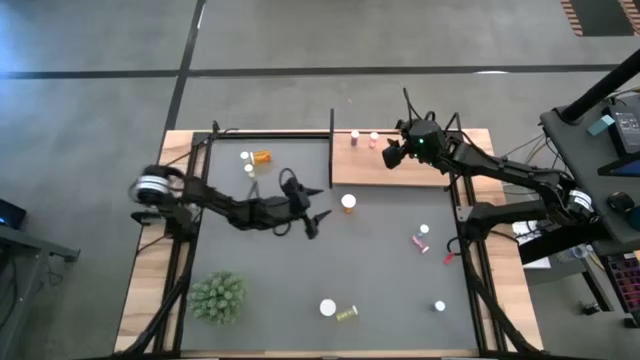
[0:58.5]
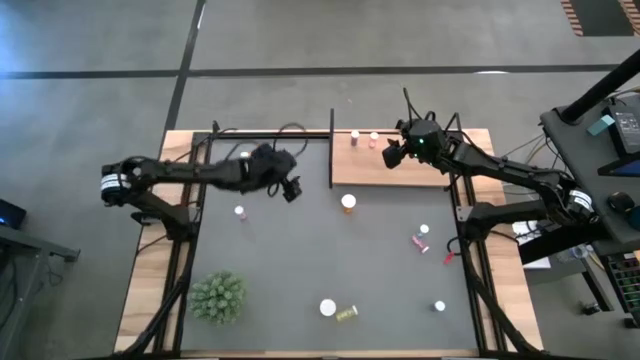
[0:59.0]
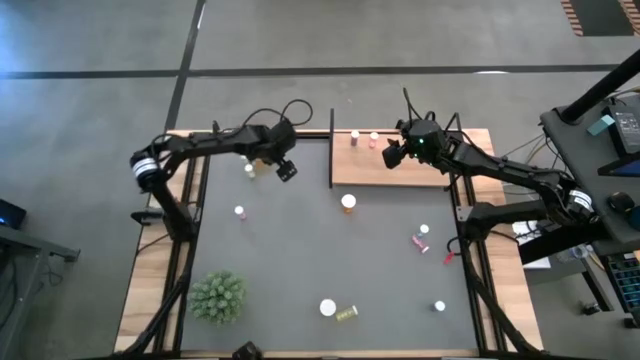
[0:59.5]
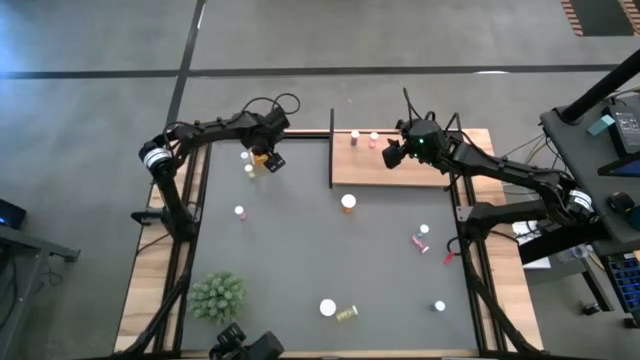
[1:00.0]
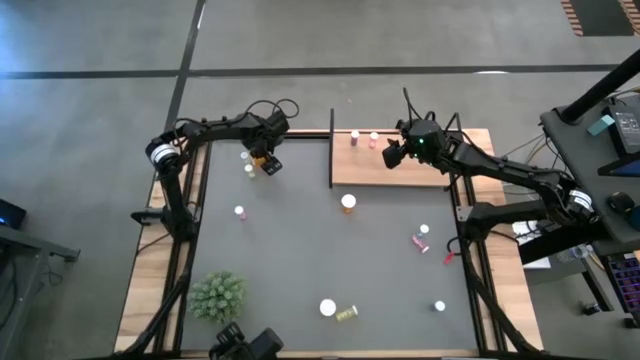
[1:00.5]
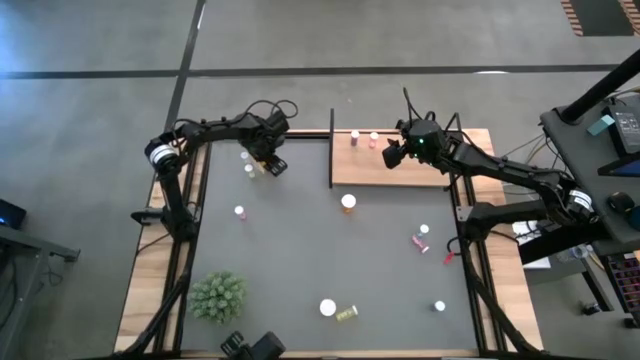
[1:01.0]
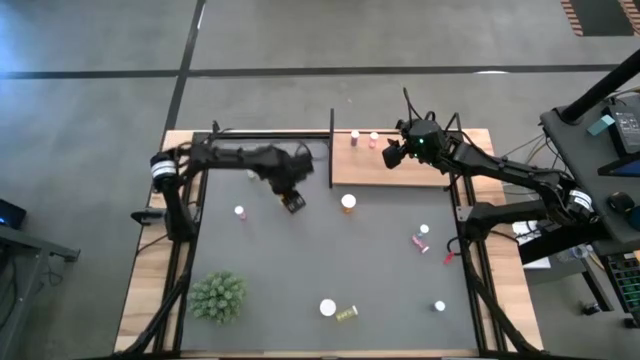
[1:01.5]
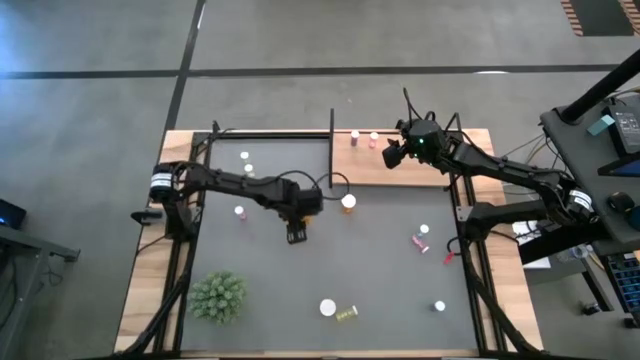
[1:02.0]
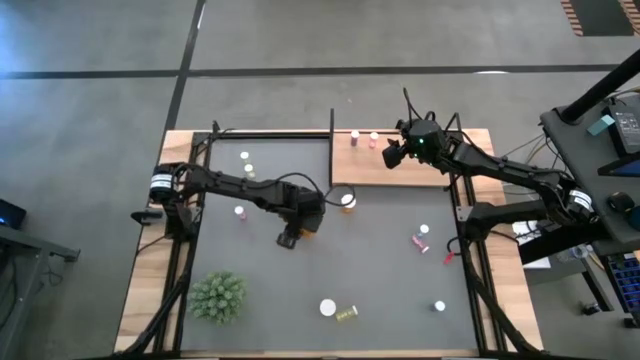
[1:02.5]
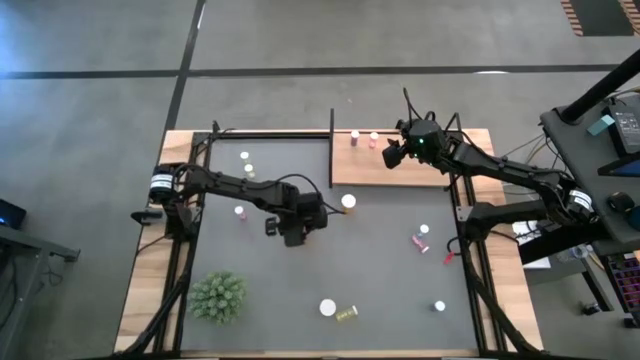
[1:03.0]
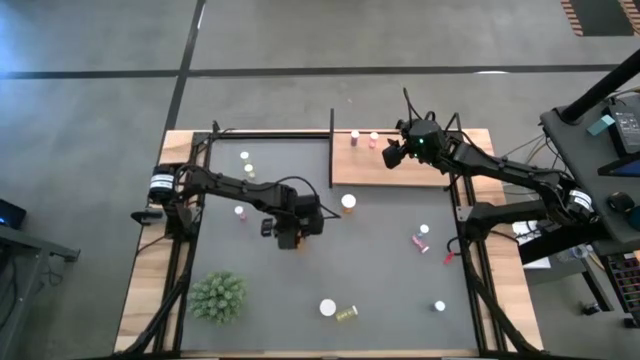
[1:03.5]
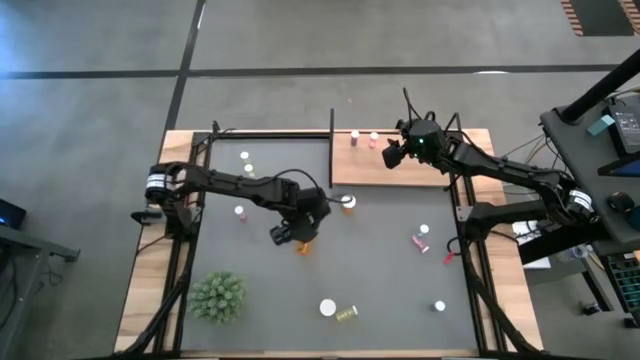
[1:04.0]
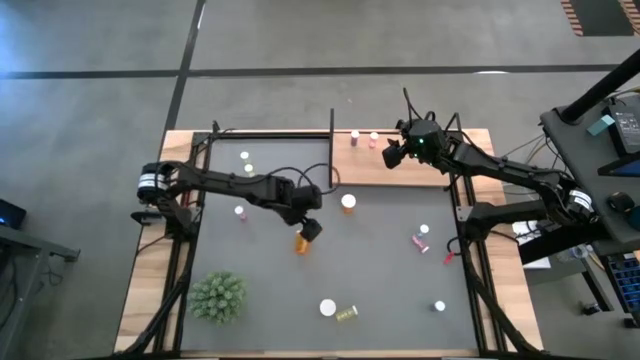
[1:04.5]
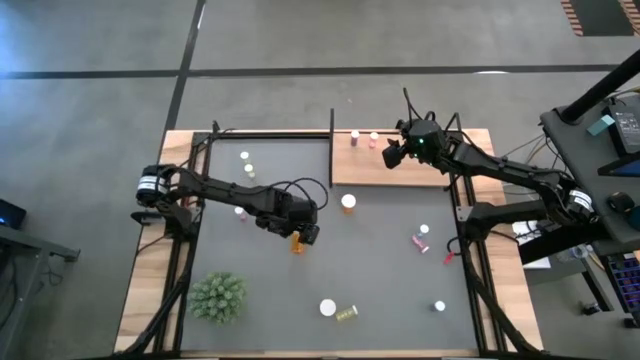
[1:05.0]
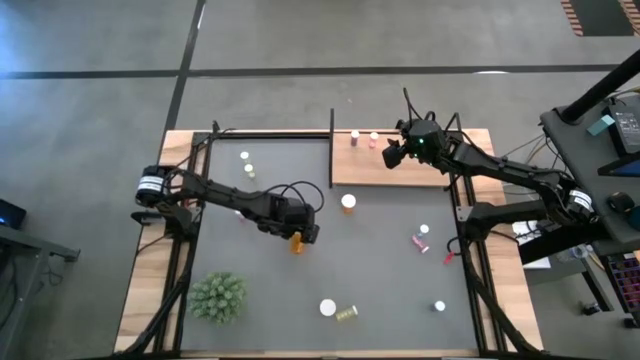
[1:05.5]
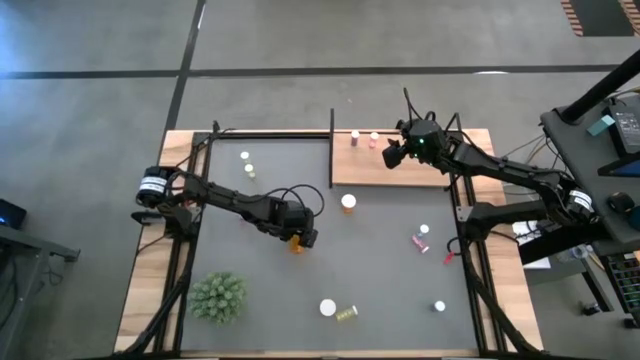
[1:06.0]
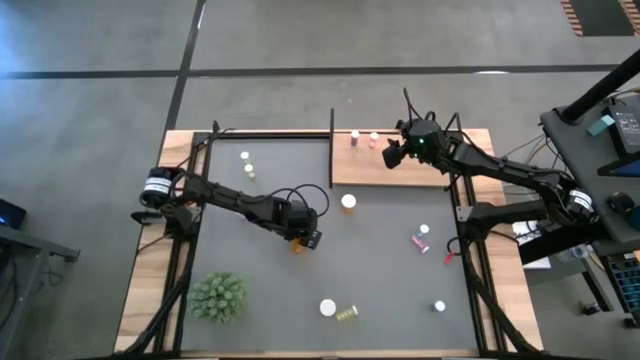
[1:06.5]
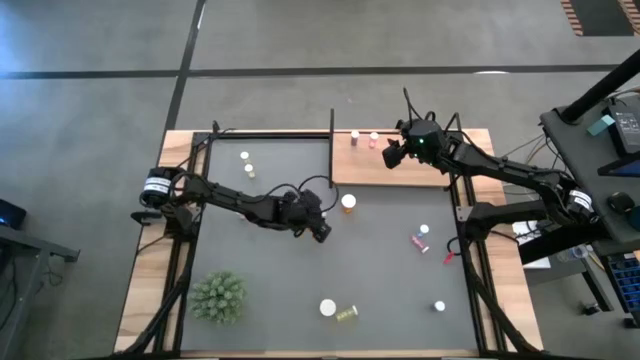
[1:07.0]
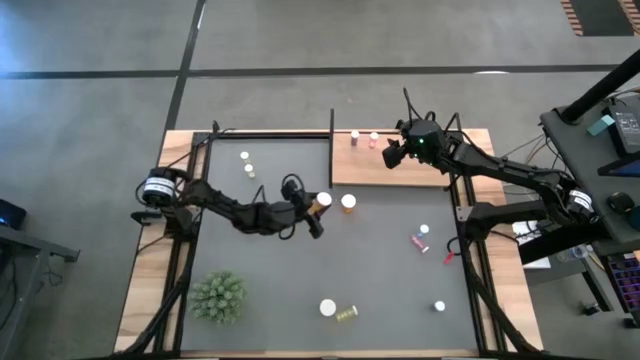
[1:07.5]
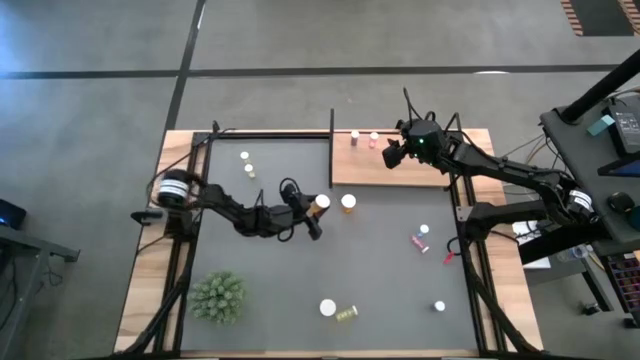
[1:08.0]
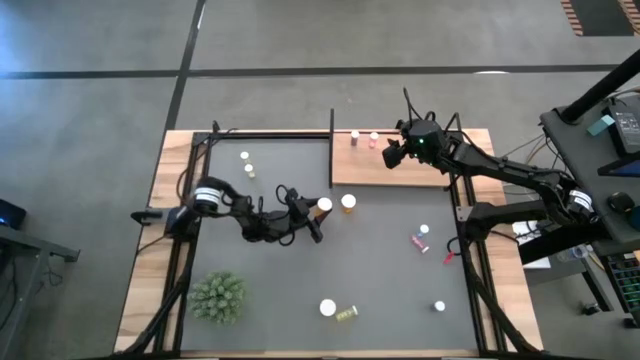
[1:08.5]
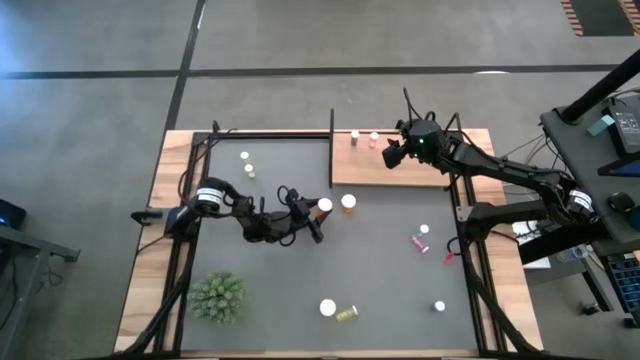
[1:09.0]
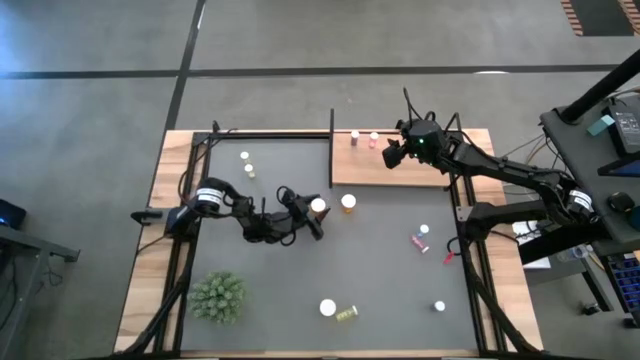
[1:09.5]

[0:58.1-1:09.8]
Task: Pick and place medicine bottles onto shelf by color
Move the top orange pill bottle to the center of the table

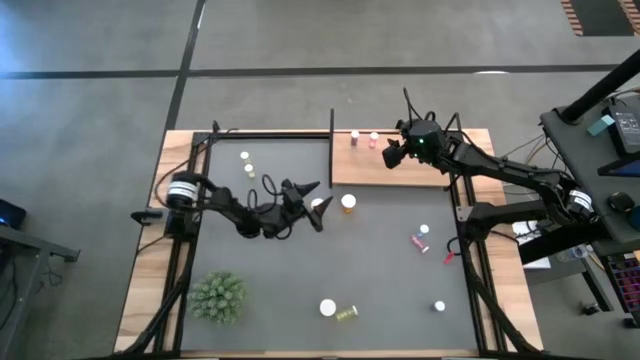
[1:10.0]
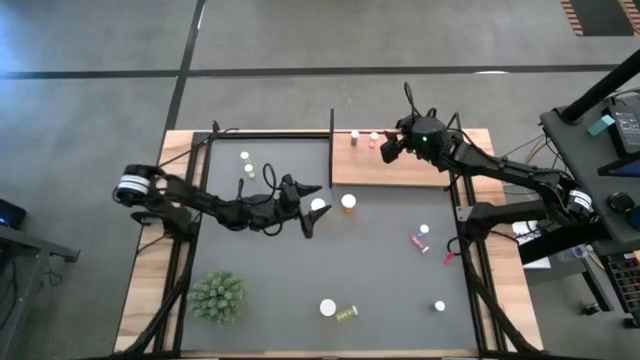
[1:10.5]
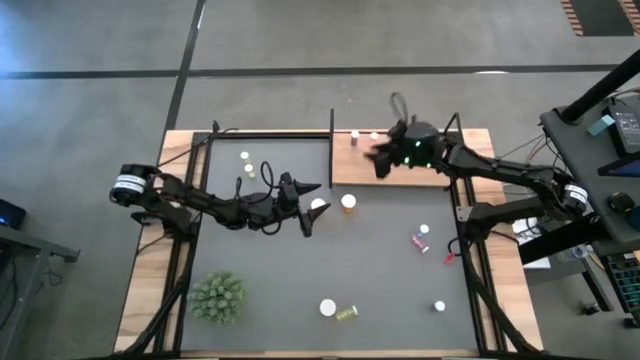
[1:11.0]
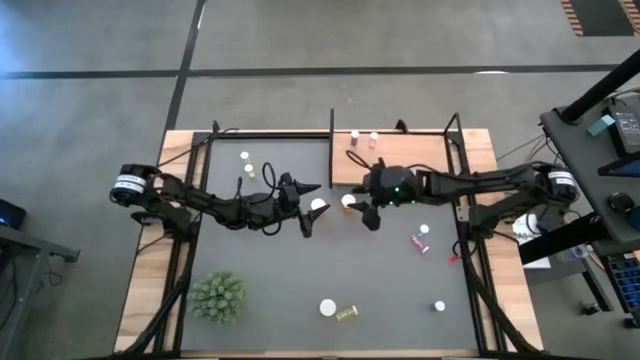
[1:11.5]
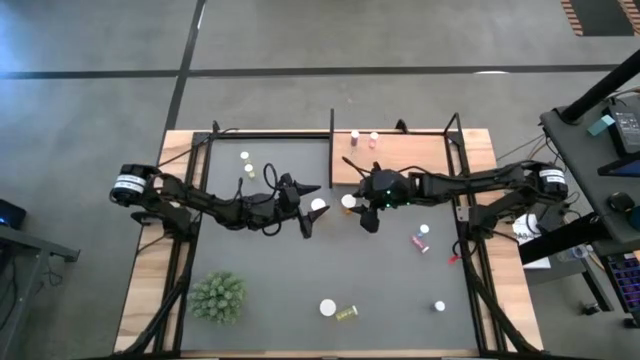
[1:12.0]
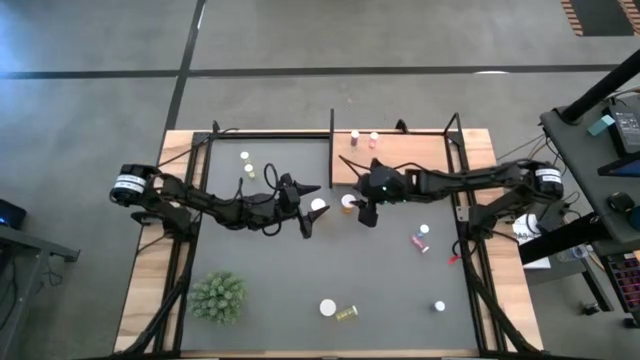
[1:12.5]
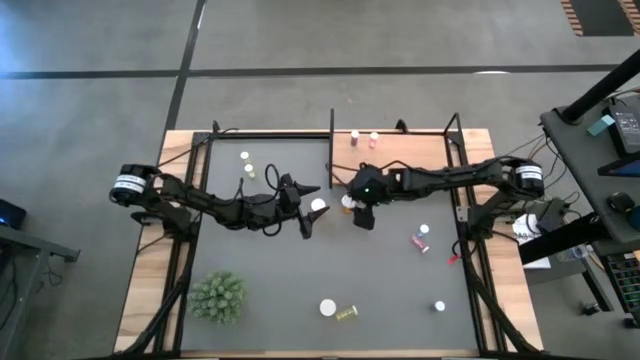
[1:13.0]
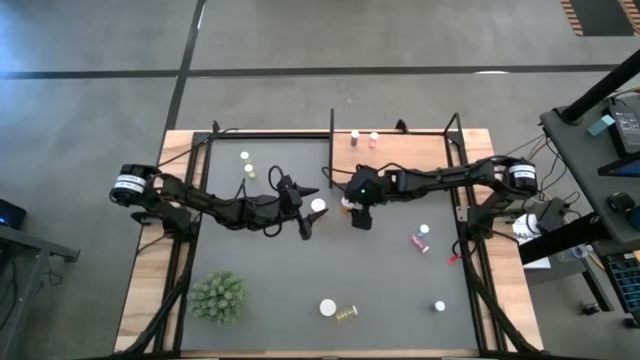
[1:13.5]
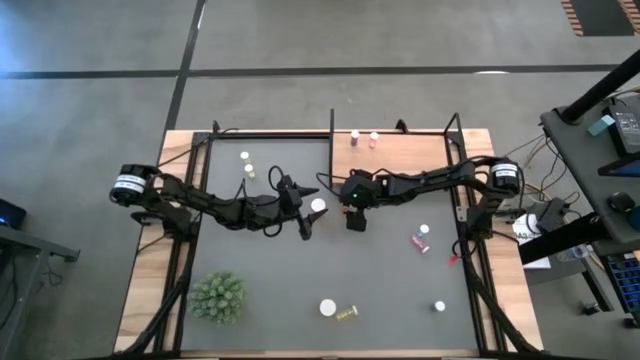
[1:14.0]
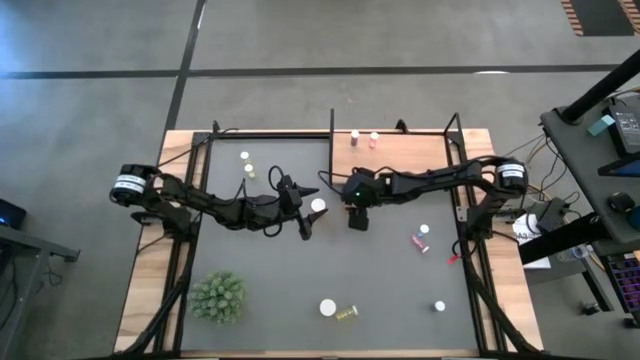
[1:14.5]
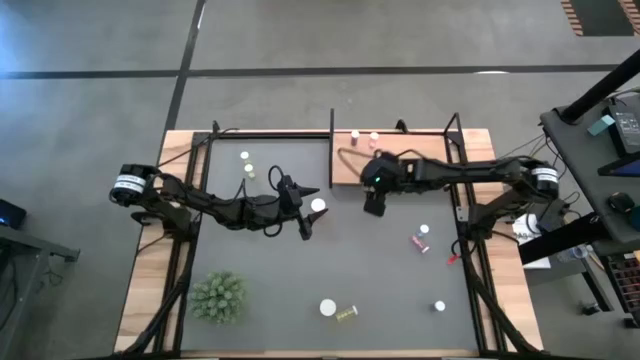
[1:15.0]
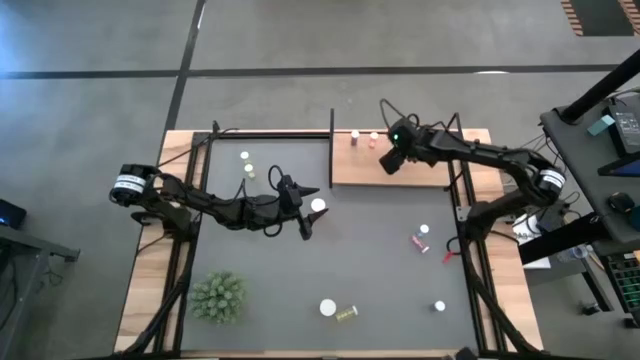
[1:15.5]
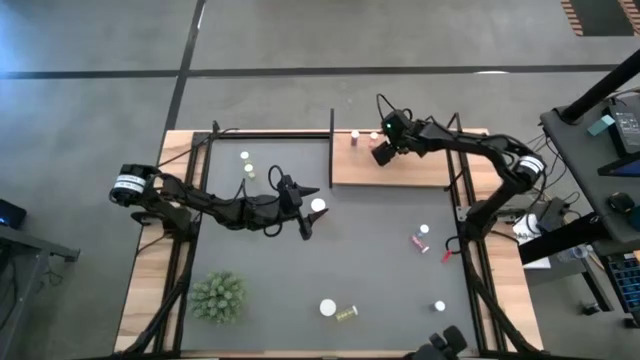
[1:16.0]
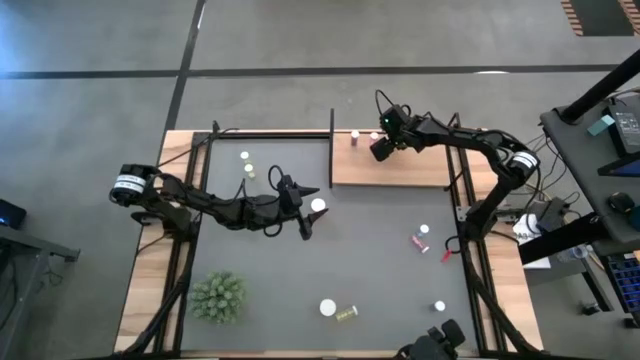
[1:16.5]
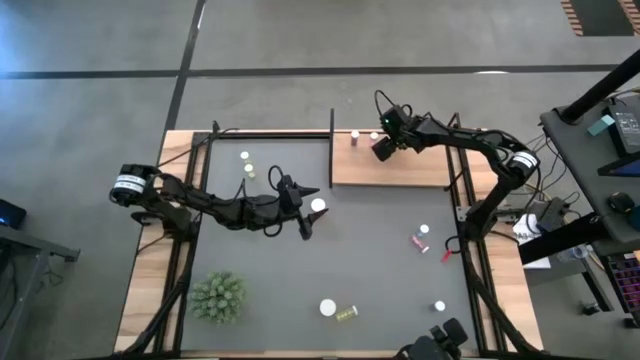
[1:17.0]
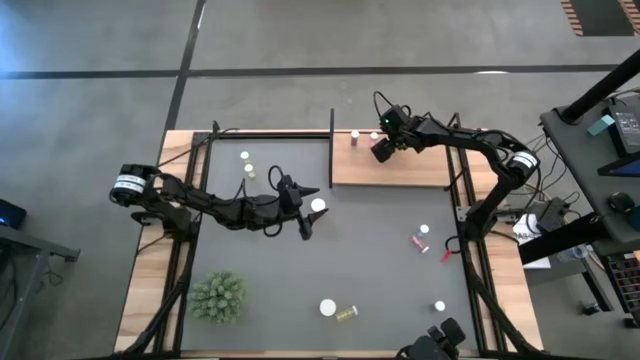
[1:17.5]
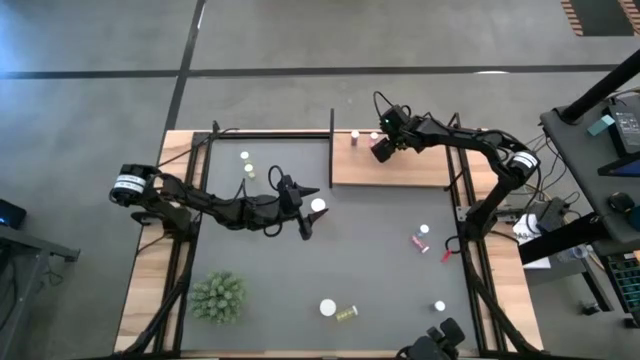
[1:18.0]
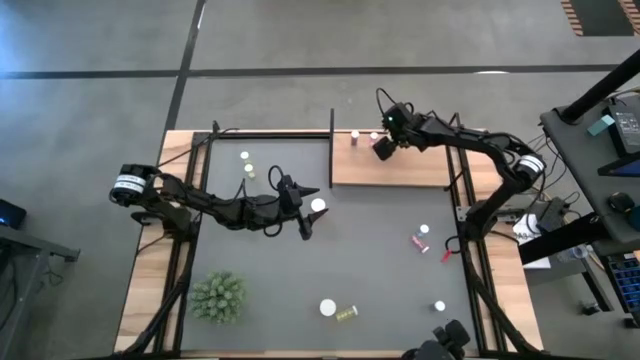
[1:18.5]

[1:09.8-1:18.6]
Put the top right orange pill bottle on the shelf
